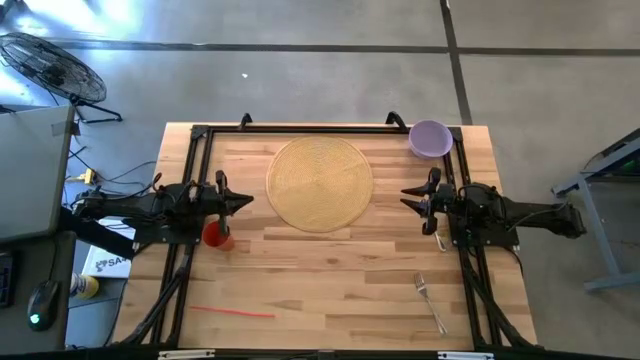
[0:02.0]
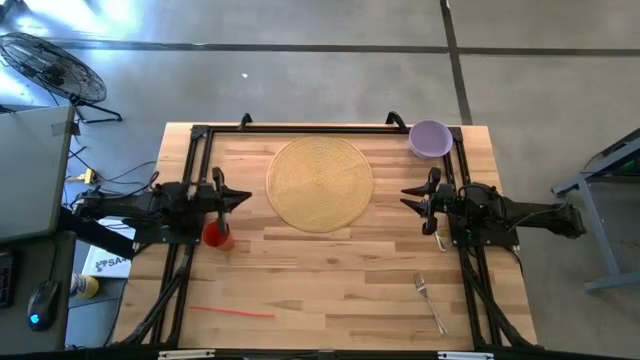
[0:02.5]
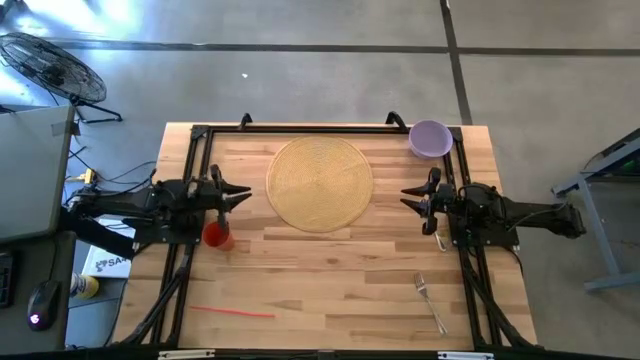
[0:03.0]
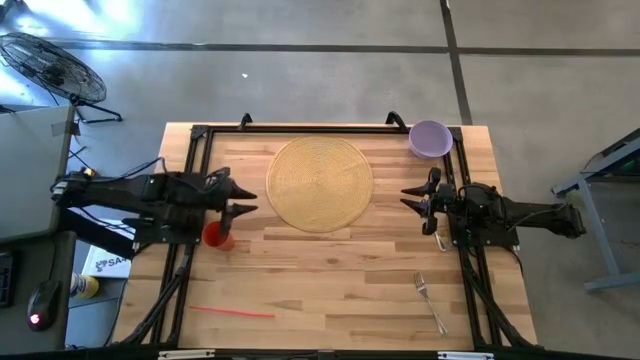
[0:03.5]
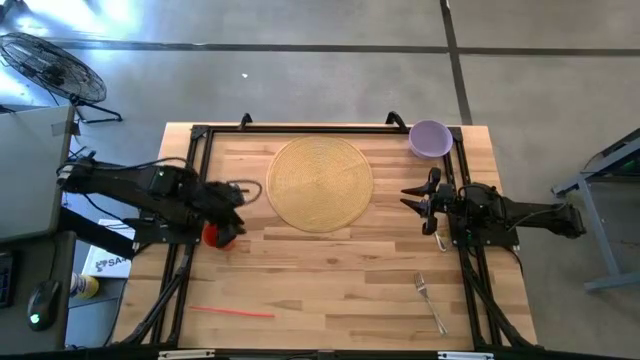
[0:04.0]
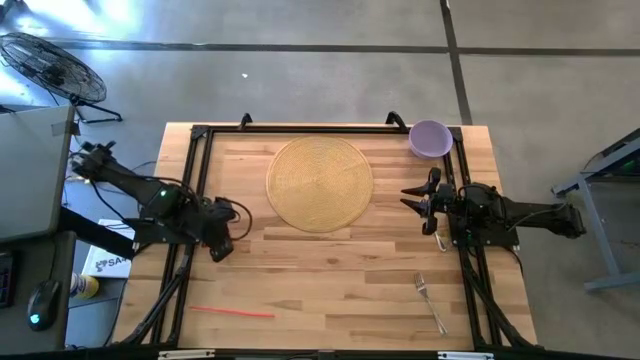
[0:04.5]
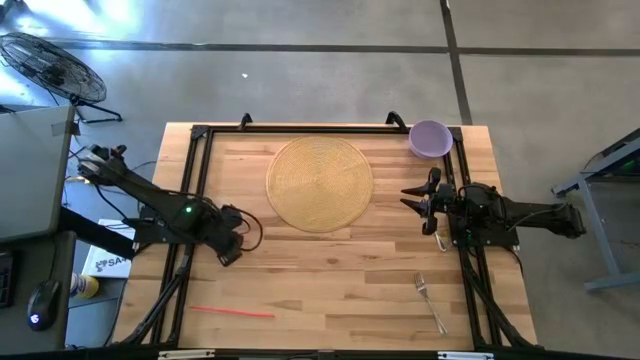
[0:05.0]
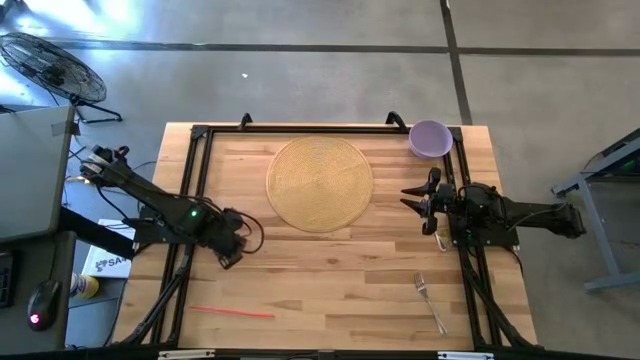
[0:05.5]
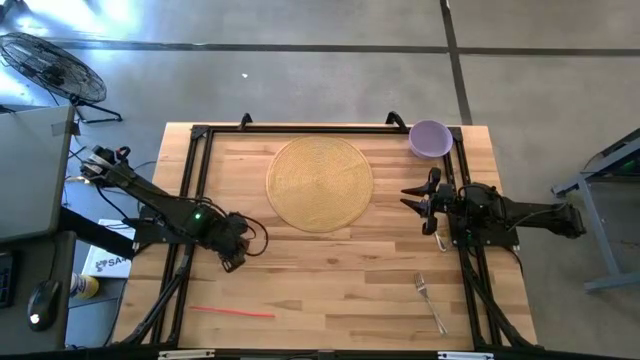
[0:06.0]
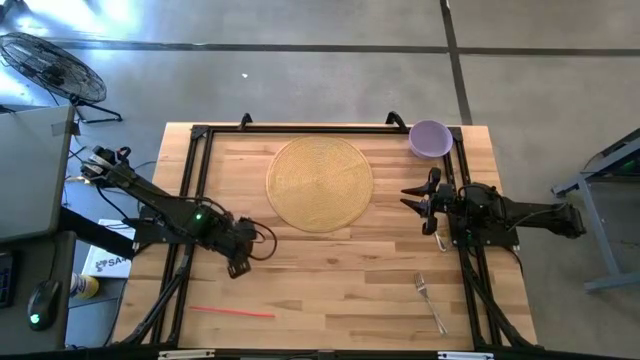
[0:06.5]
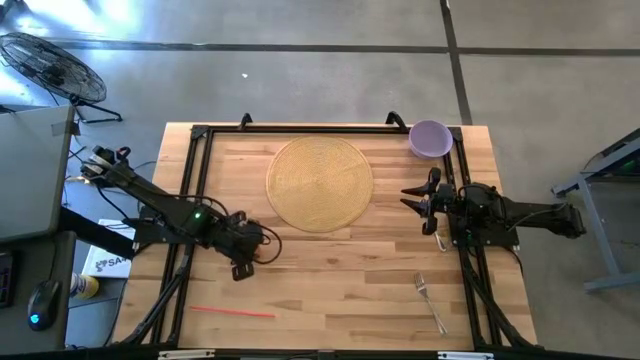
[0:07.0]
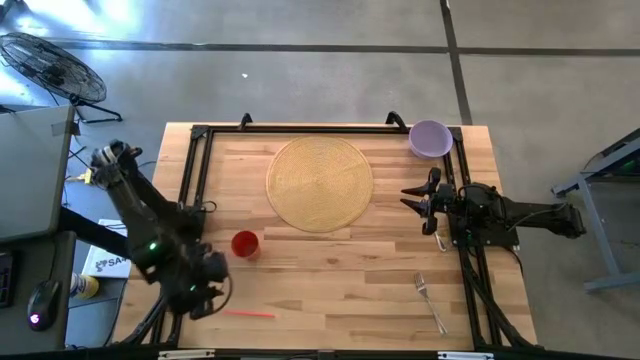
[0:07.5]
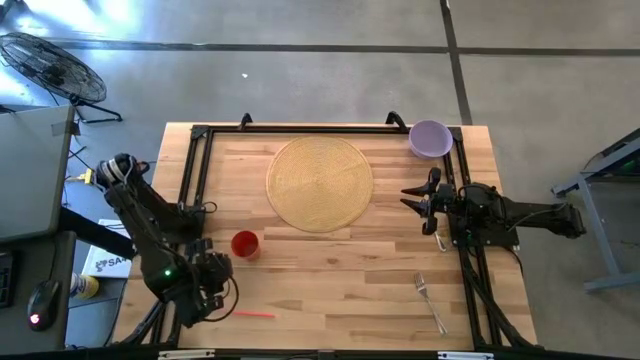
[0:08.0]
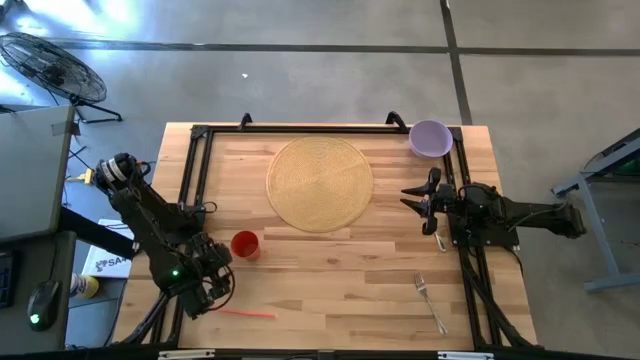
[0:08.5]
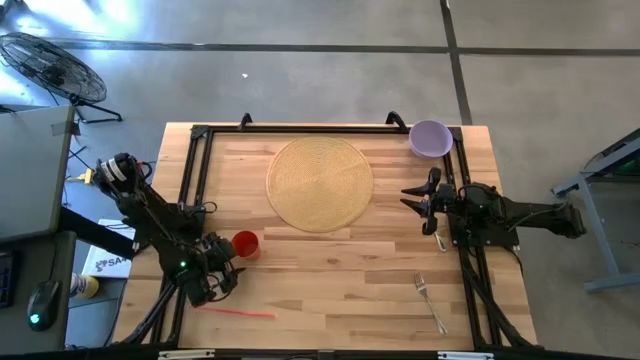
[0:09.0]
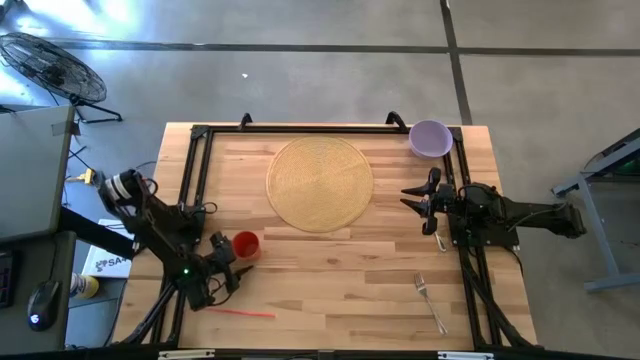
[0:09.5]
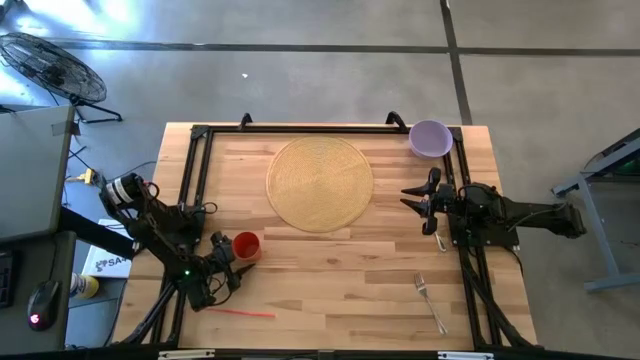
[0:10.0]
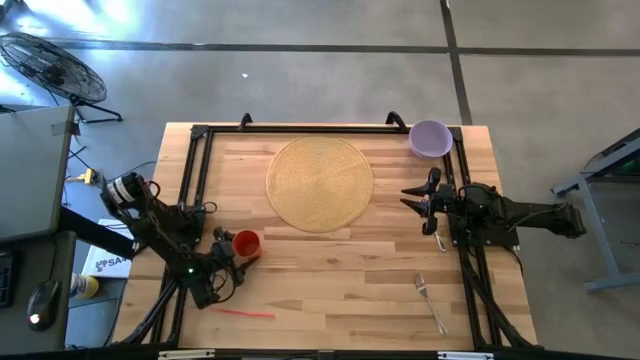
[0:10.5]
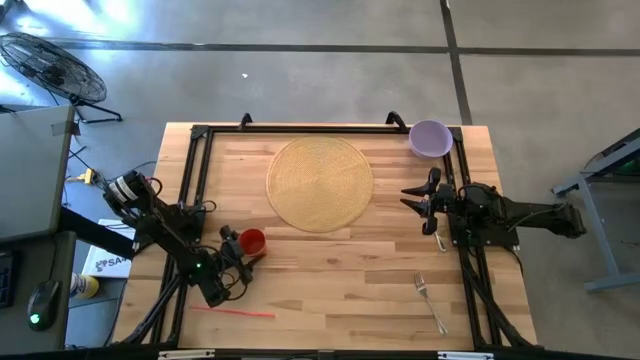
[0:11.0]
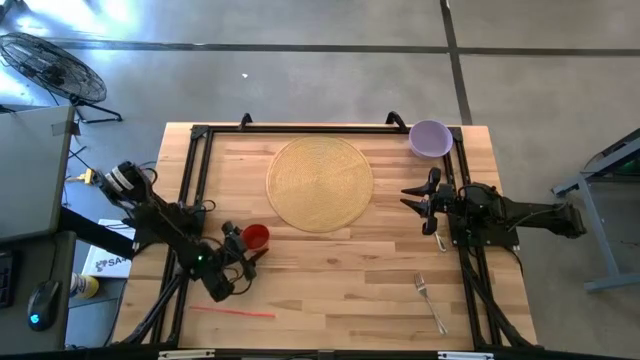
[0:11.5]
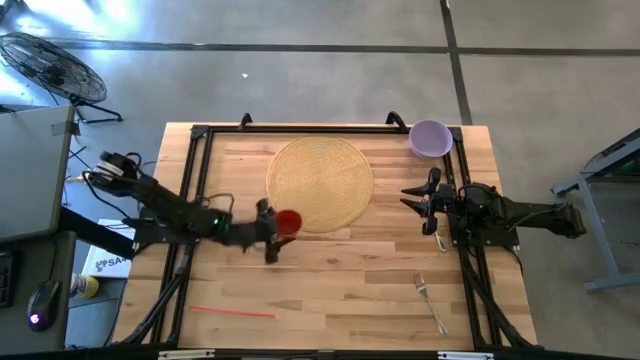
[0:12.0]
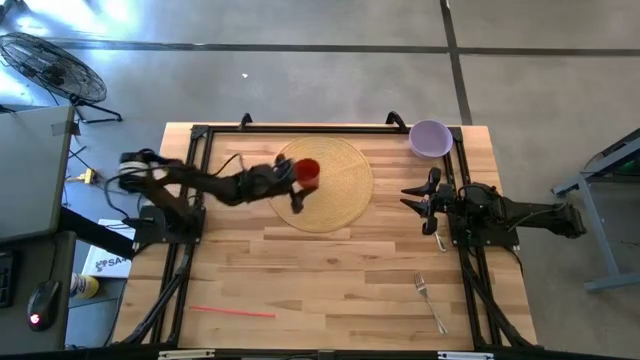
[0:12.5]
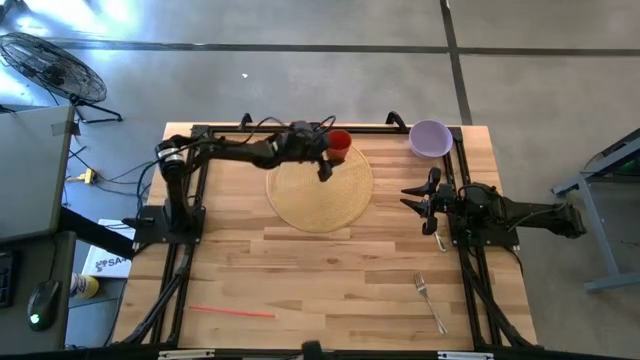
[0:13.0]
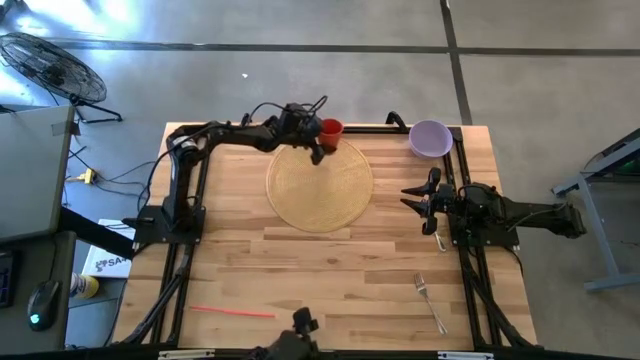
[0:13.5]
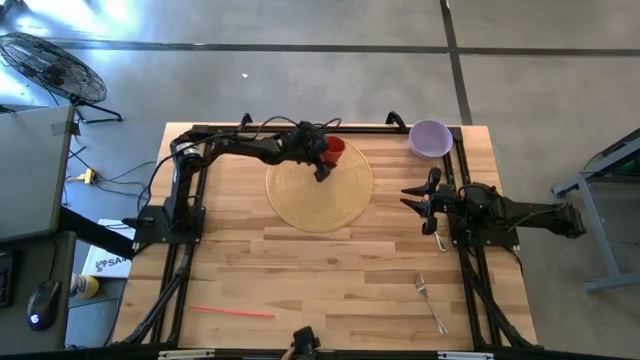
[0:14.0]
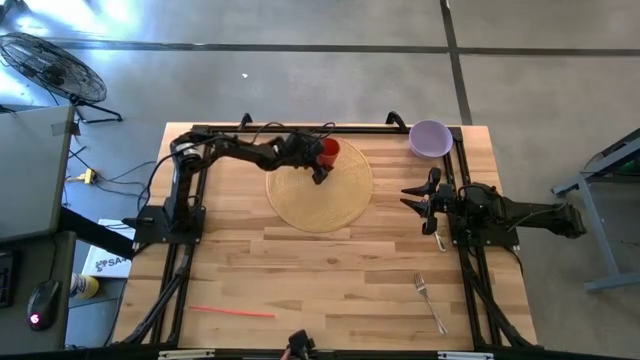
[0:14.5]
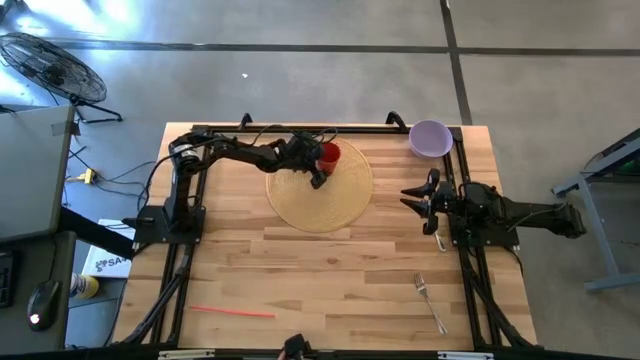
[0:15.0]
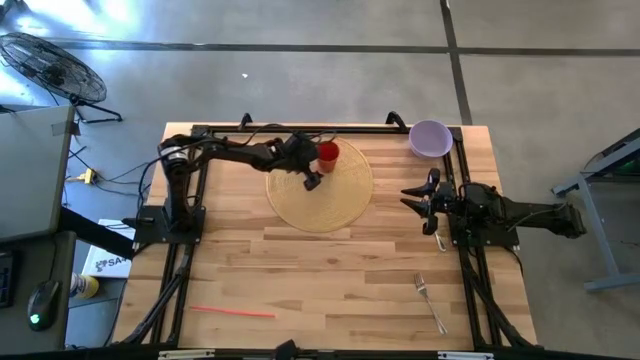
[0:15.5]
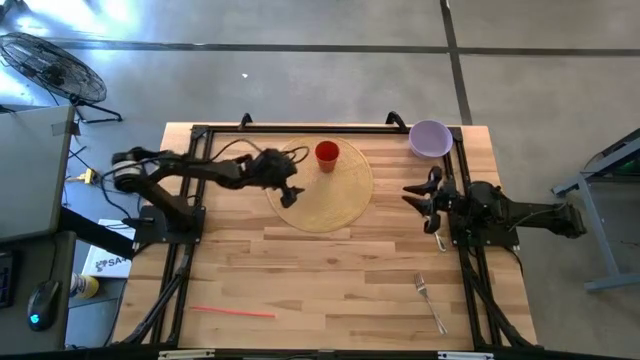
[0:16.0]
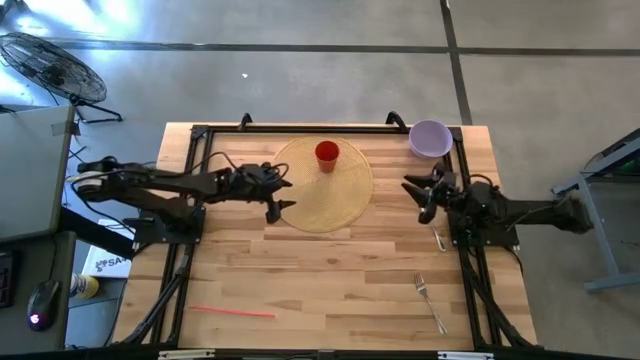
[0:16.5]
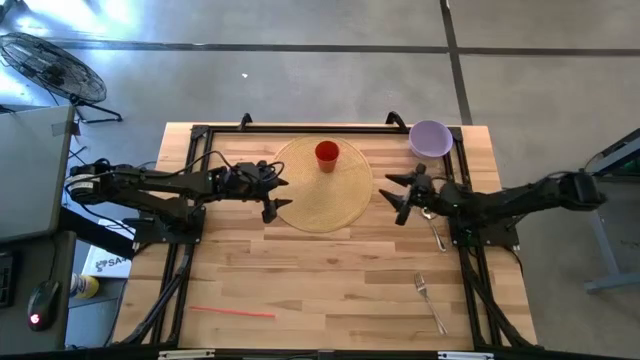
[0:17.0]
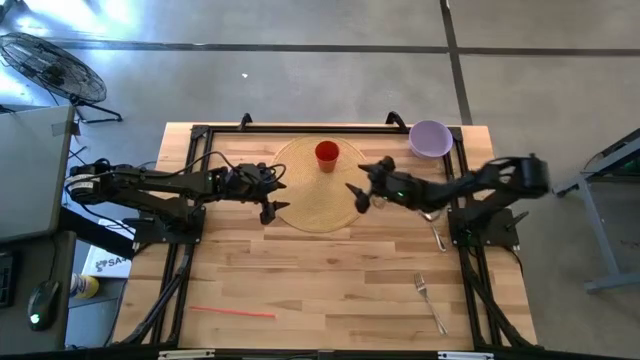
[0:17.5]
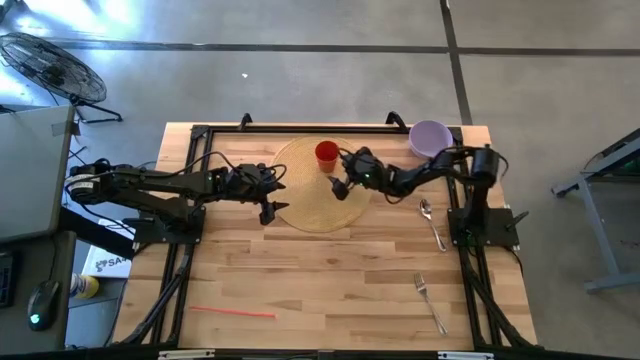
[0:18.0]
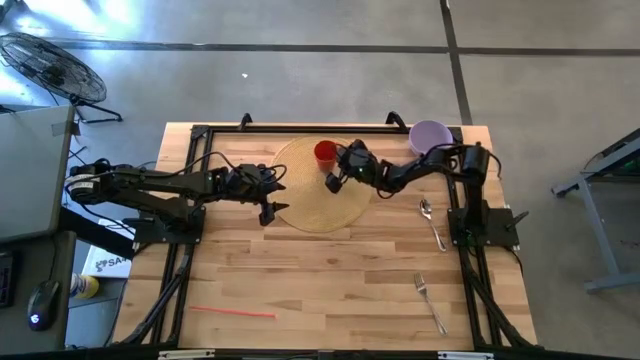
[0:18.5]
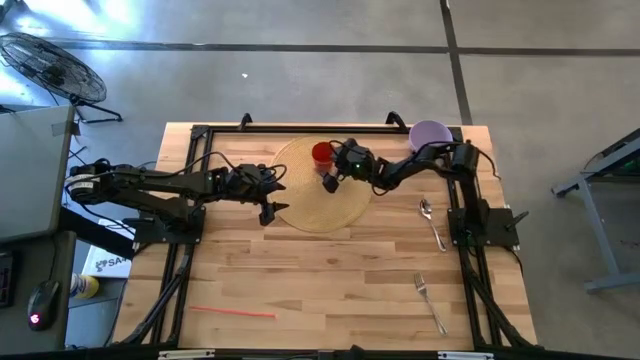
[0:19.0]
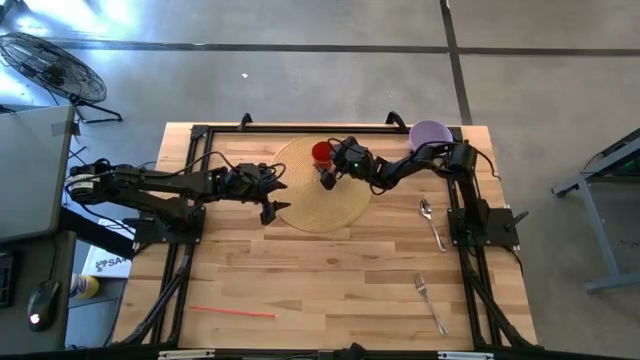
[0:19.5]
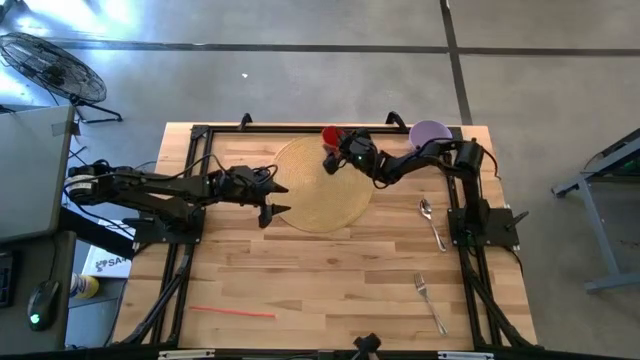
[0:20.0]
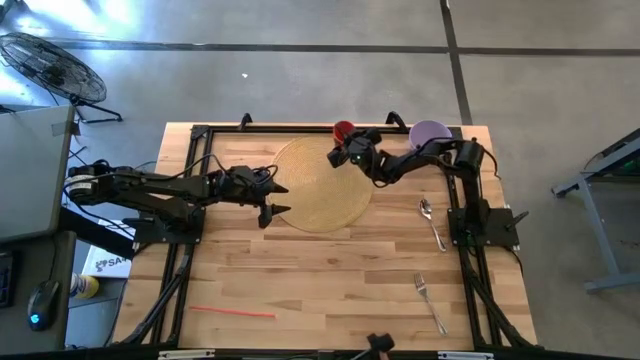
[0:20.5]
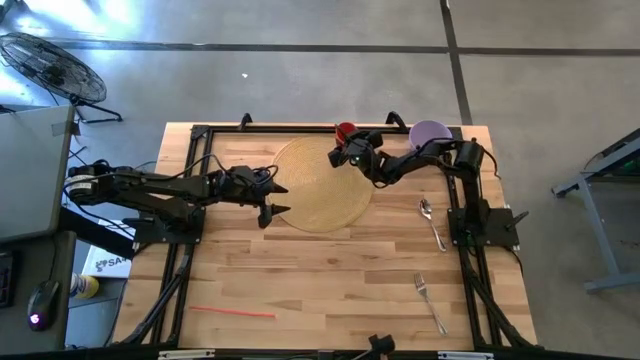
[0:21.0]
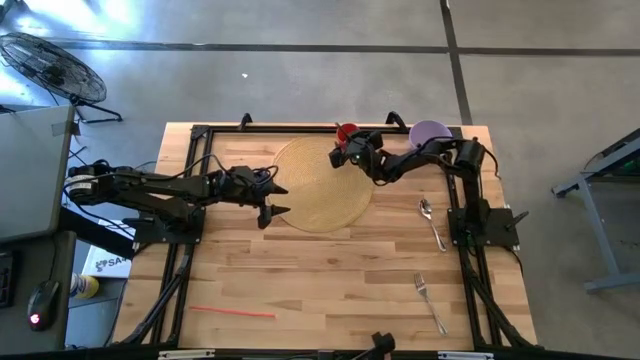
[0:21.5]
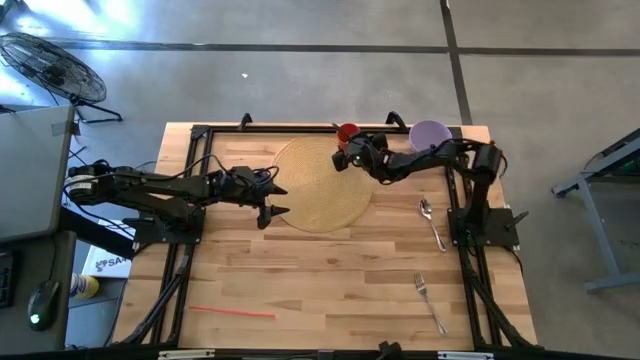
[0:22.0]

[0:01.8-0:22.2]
Task: Pick & Place Utensil
Put the orange cup on the top right of the table mat
